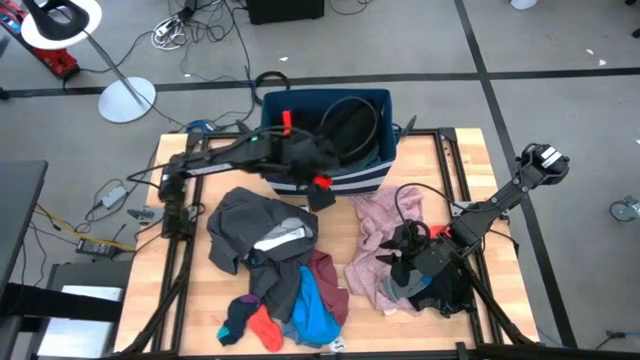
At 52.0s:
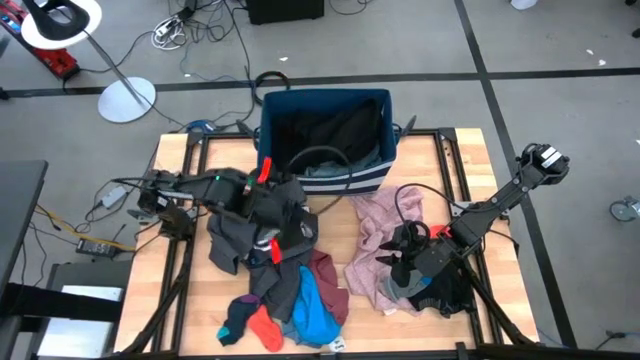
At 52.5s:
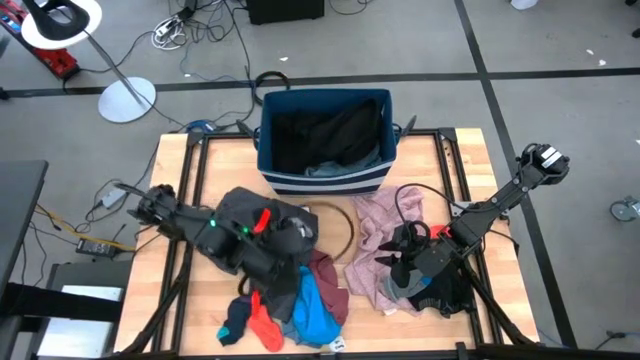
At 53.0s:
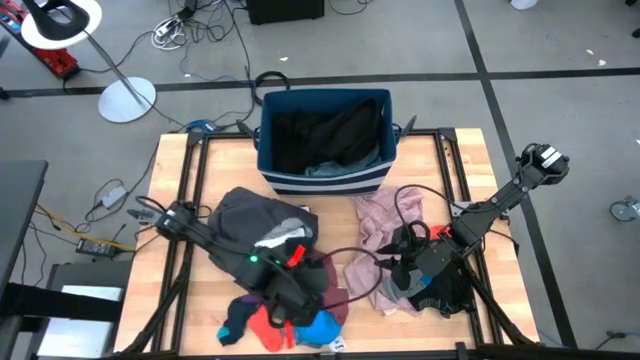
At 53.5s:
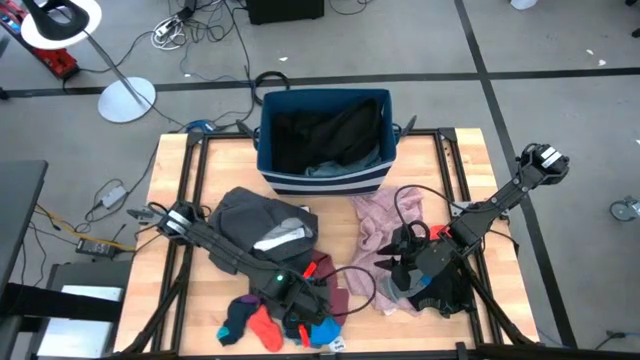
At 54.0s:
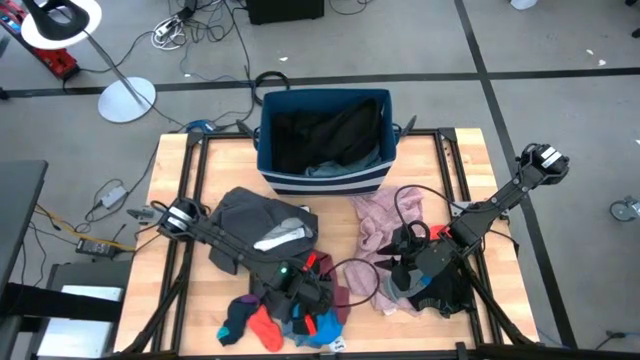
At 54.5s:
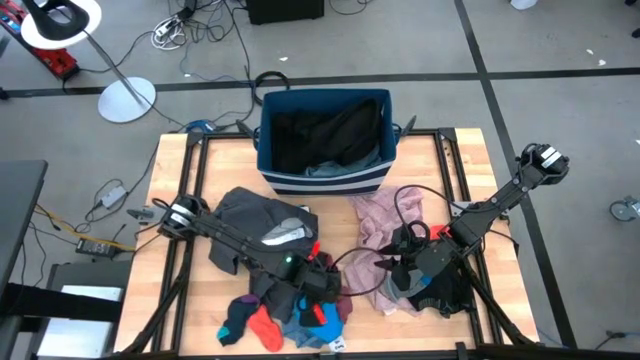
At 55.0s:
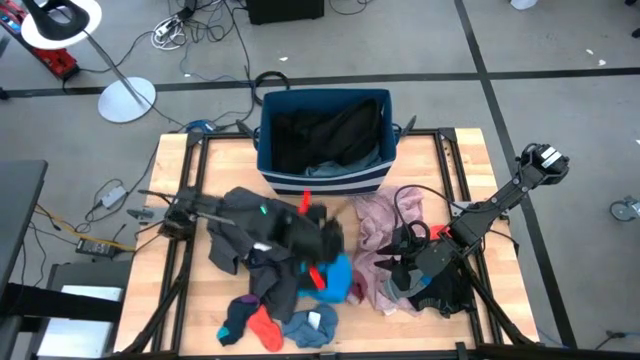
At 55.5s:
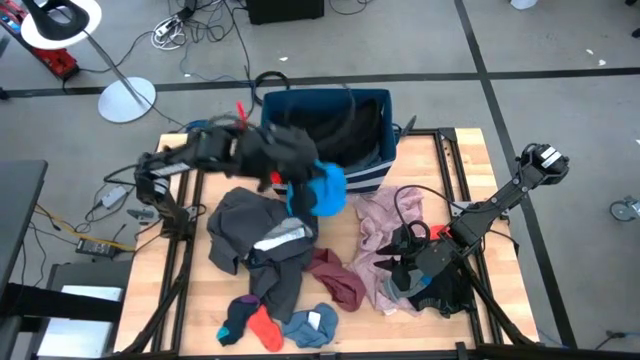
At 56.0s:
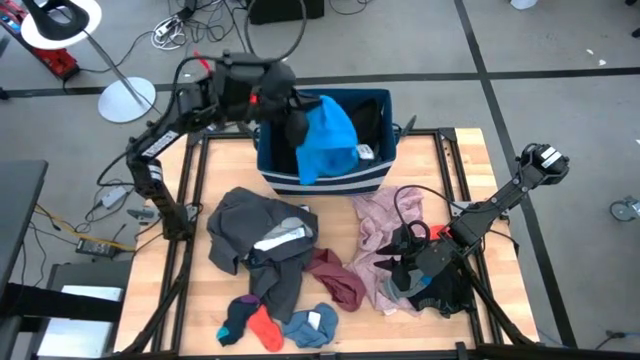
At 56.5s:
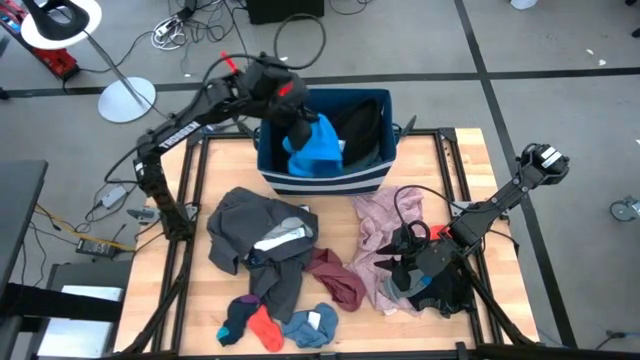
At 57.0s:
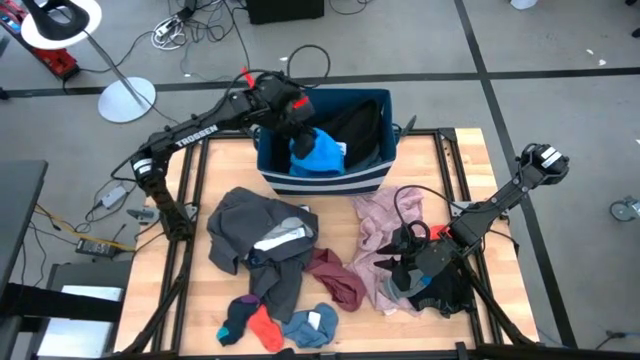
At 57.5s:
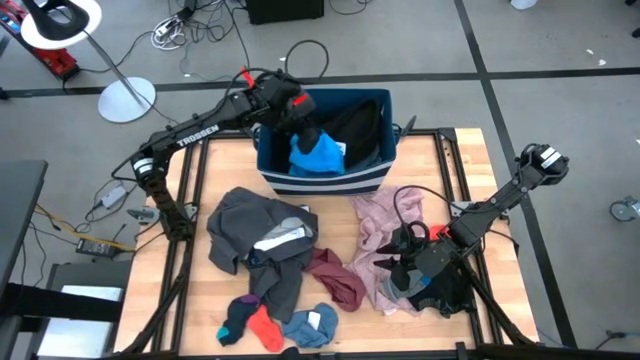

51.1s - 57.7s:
Task: Sort clothes
Put the top blue microfiber cloth into the laundry bin

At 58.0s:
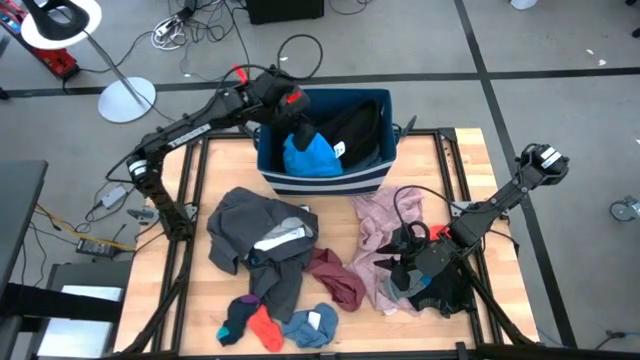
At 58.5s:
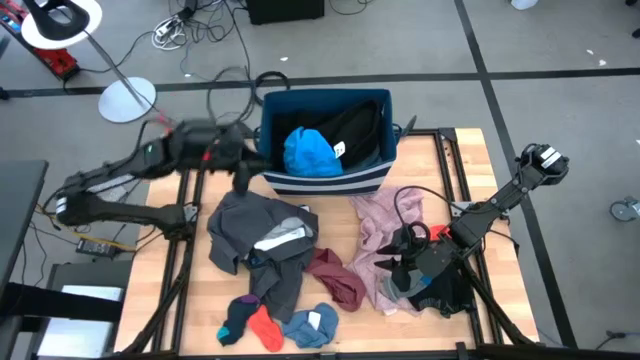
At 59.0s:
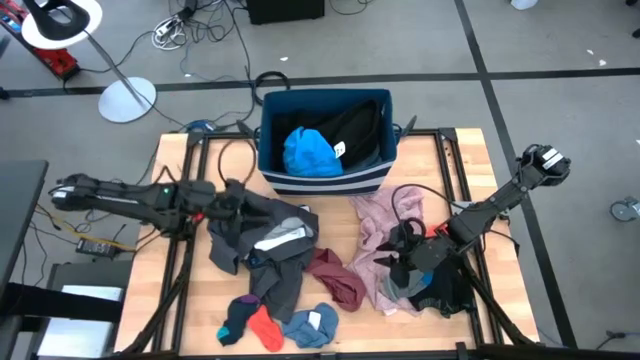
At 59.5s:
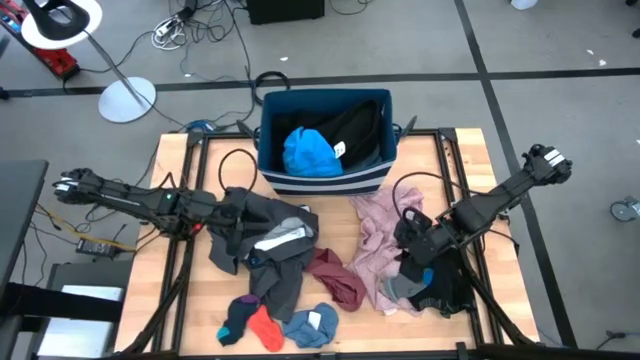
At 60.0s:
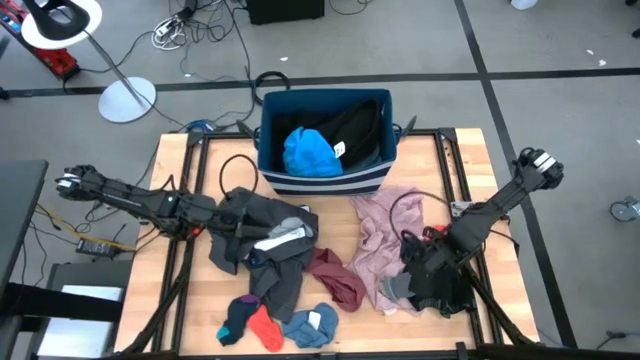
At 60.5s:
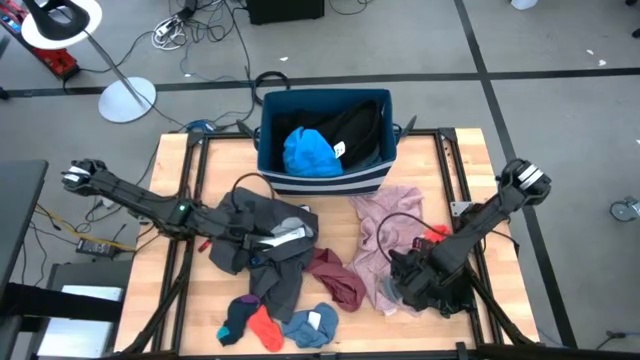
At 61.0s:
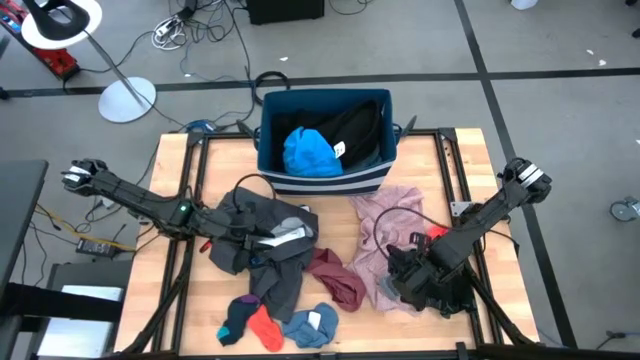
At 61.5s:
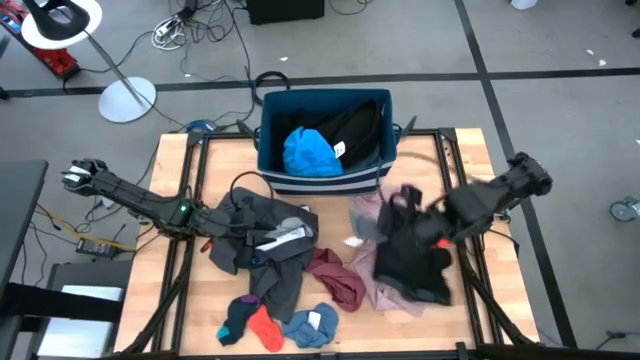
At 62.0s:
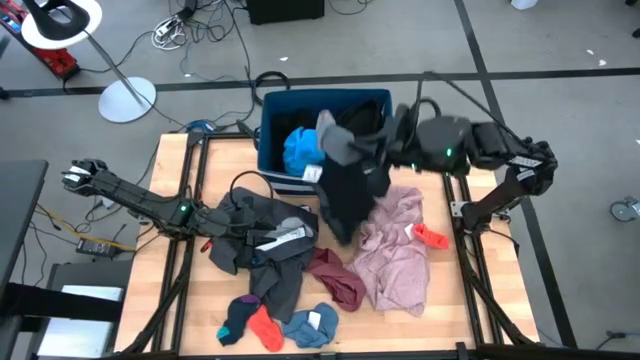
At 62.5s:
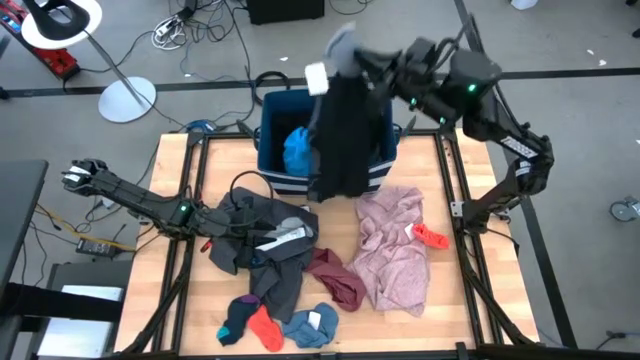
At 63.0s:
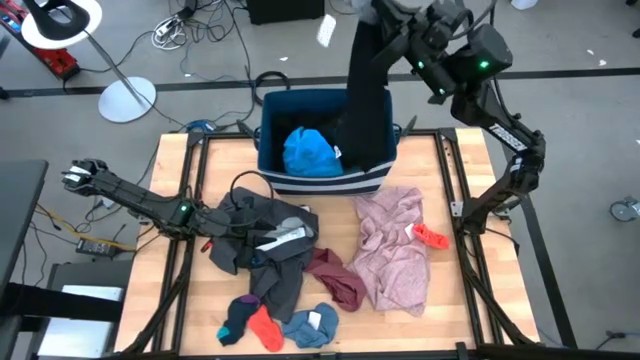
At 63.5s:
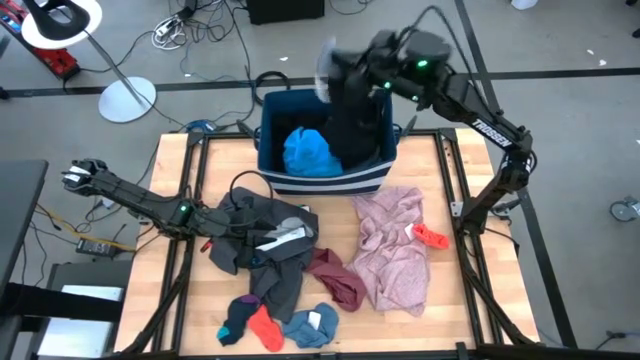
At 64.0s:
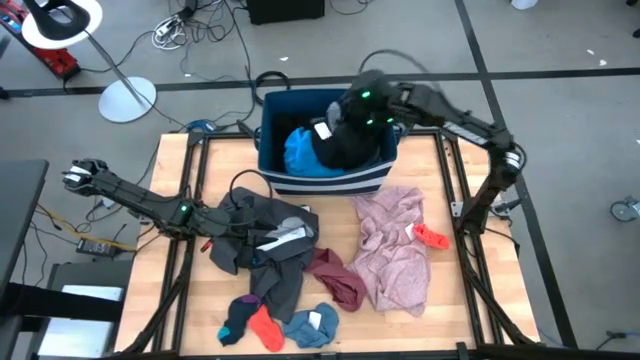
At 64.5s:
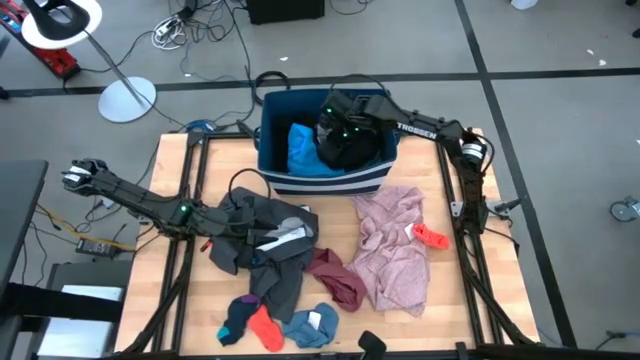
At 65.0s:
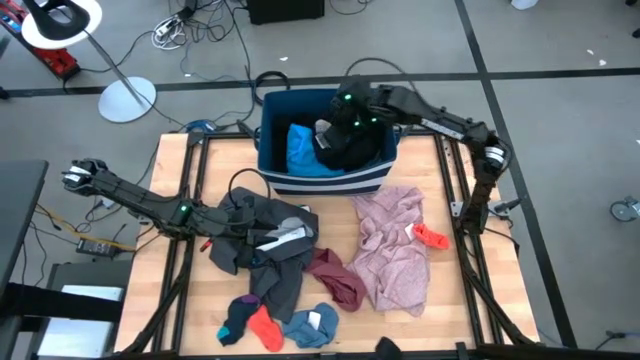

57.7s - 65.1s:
Put the gray sock into the laundry bin

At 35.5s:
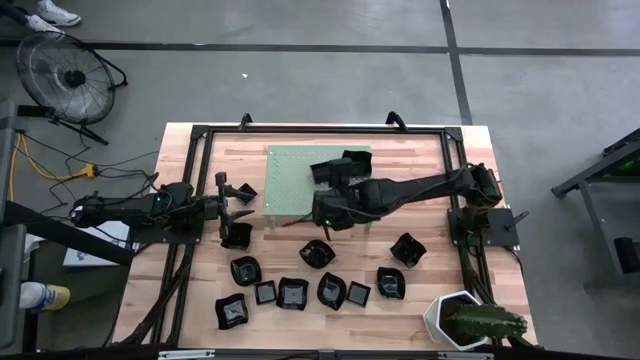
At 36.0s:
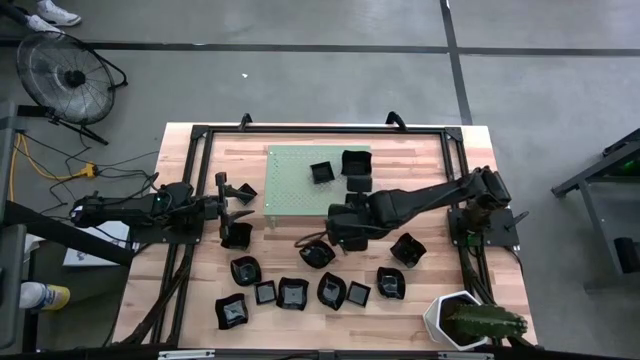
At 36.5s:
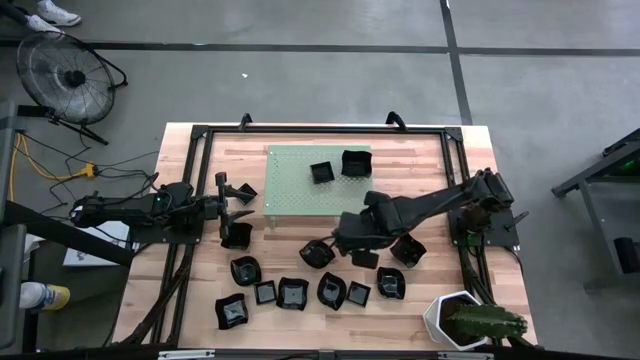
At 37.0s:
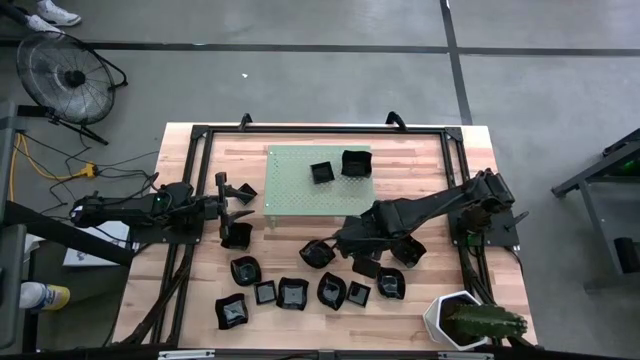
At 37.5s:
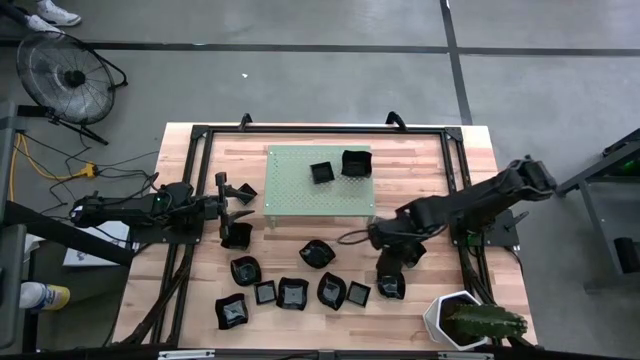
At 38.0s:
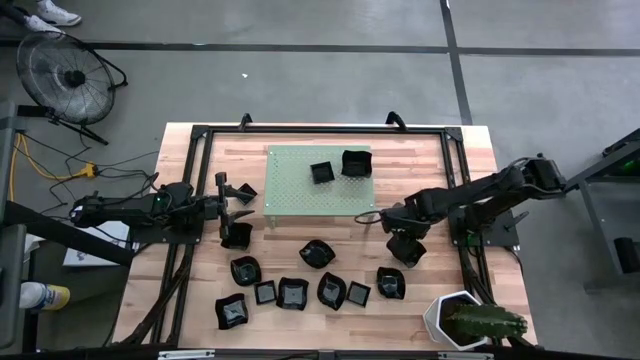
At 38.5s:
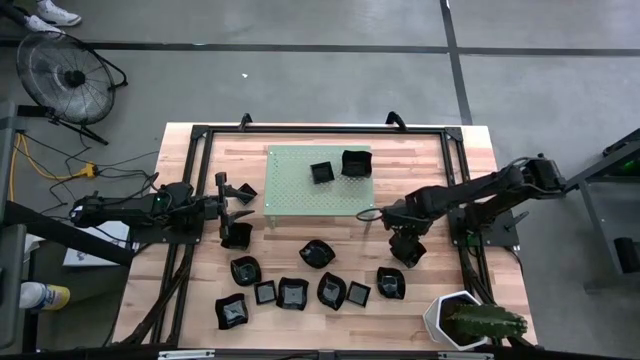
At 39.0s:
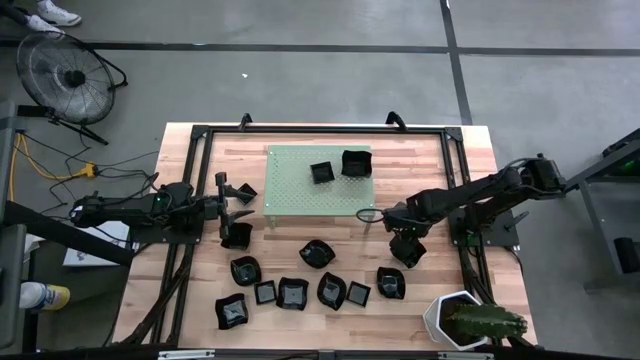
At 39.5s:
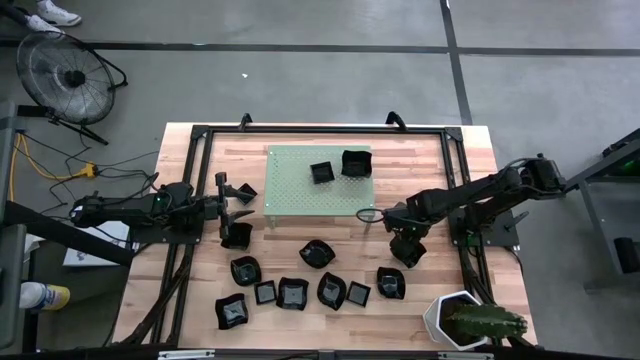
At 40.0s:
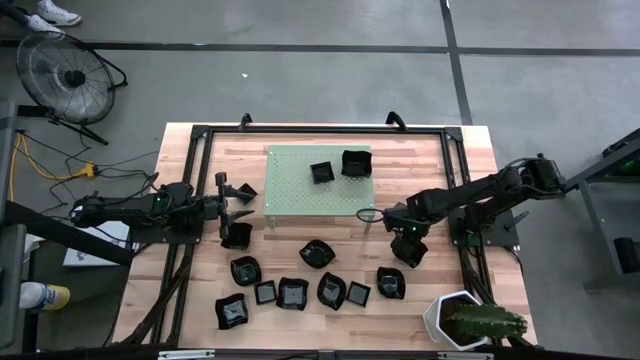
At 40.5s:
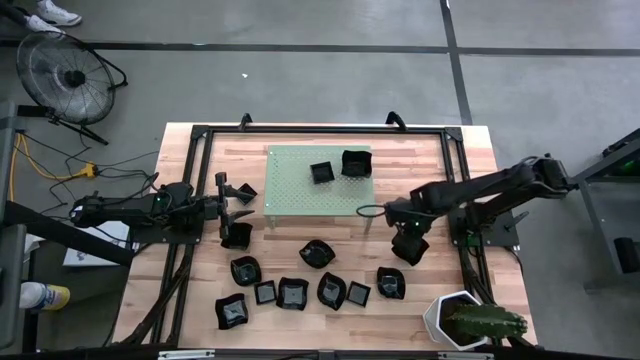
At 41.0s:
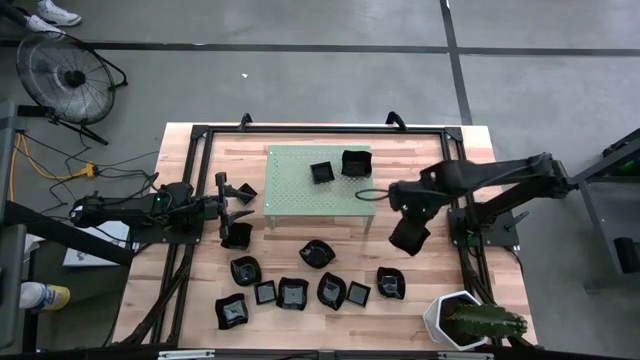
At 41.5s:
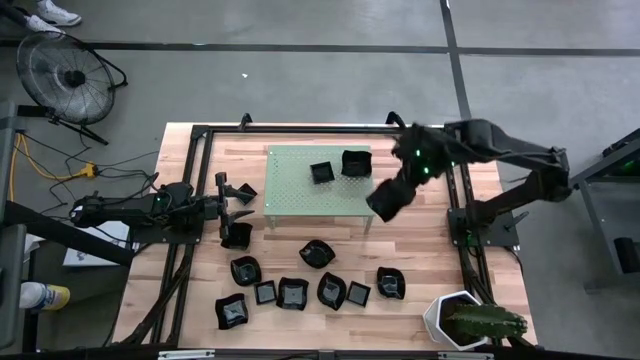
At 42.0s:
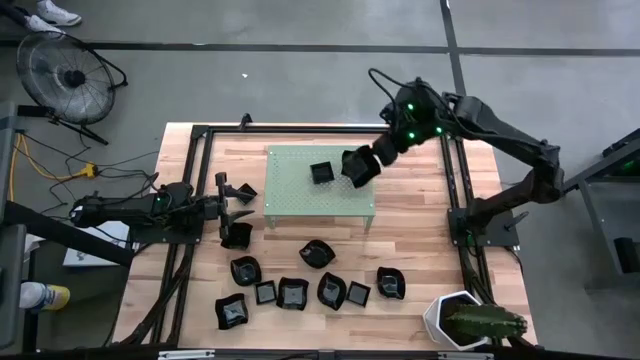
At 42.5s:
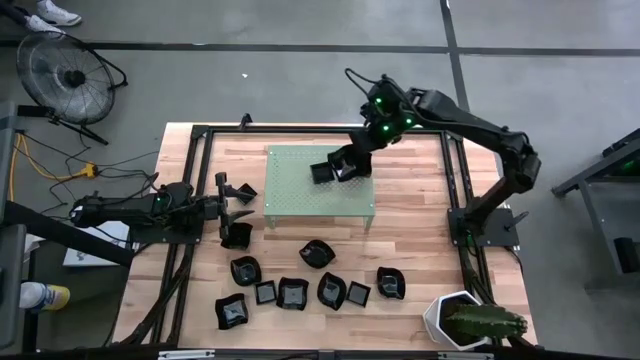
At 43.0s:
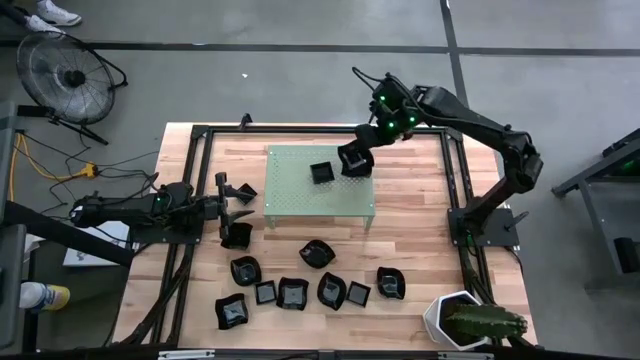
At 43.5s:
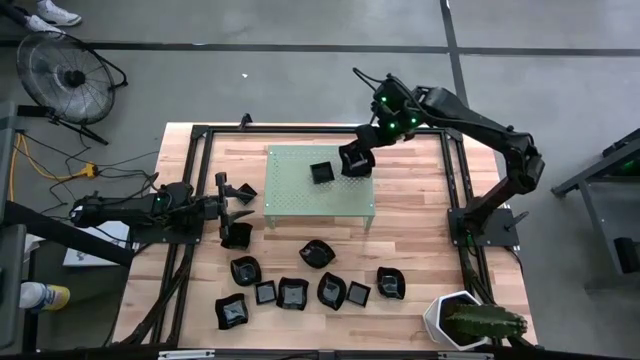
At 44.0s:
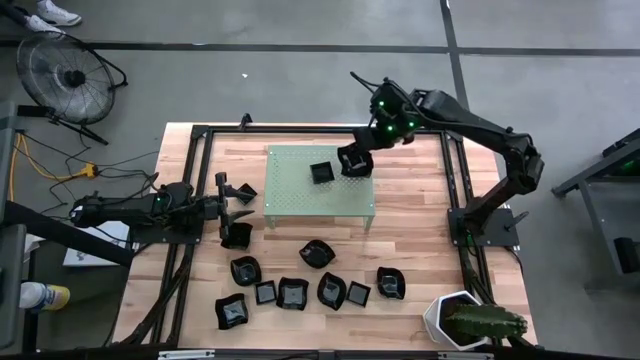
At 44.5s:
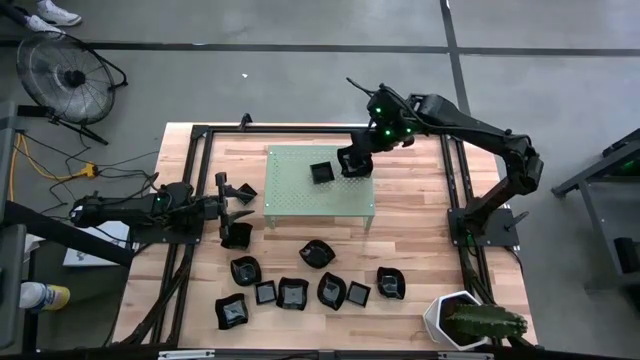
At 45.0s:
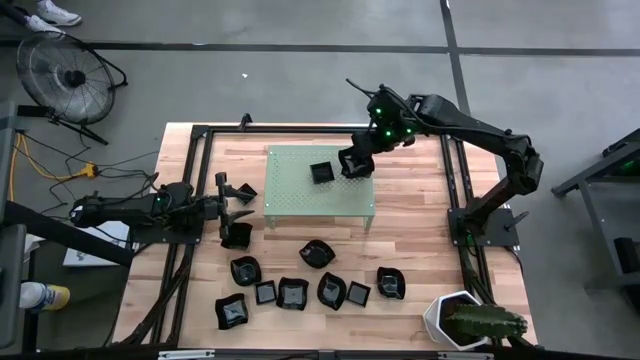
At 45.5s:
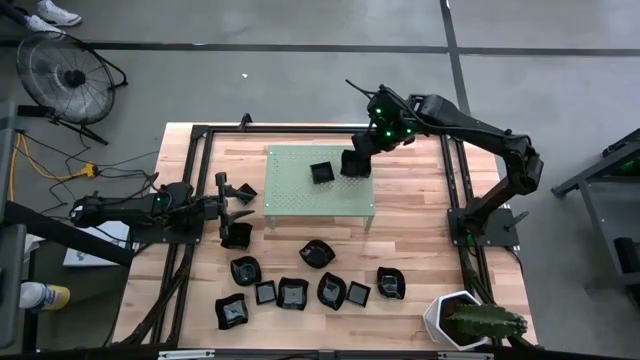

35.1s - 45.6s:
Task: Pick & Place Mini shaped plates
Stack the distorted square plate on top of the other distorted square plate on the shelf
